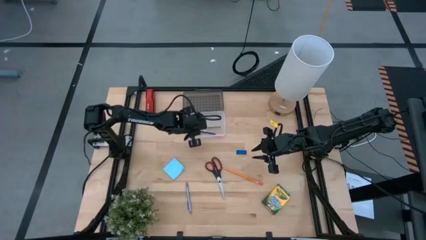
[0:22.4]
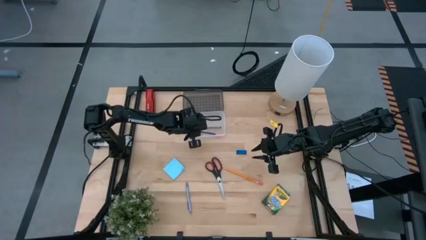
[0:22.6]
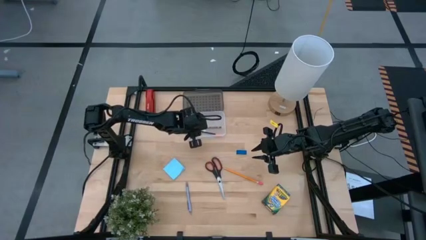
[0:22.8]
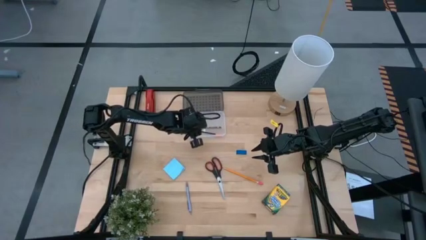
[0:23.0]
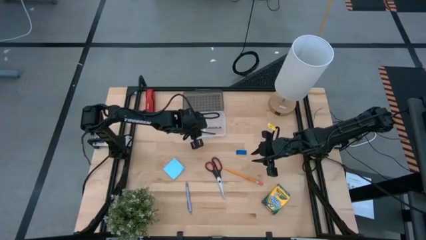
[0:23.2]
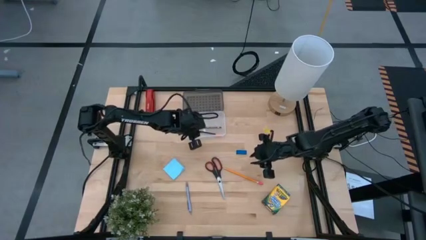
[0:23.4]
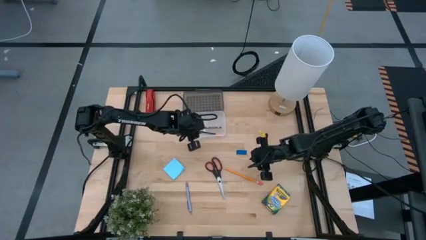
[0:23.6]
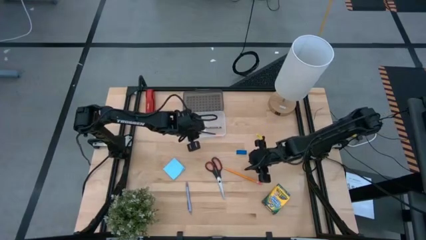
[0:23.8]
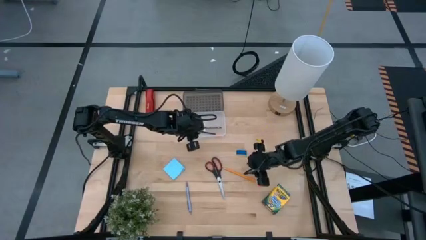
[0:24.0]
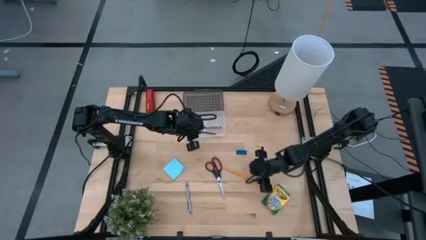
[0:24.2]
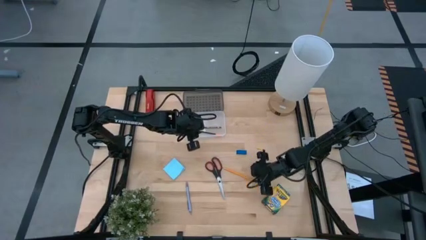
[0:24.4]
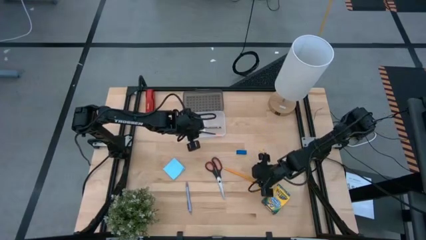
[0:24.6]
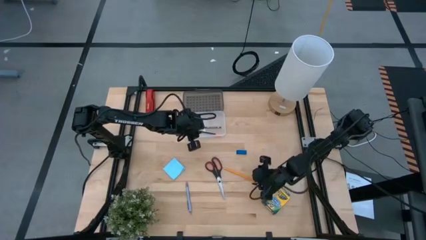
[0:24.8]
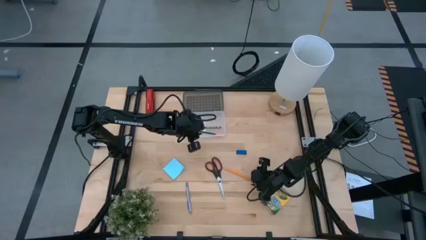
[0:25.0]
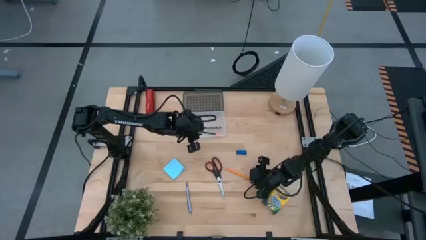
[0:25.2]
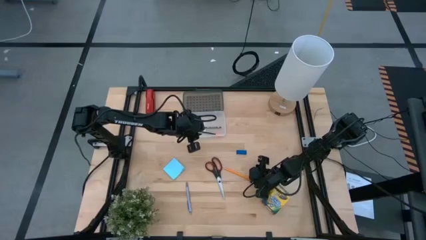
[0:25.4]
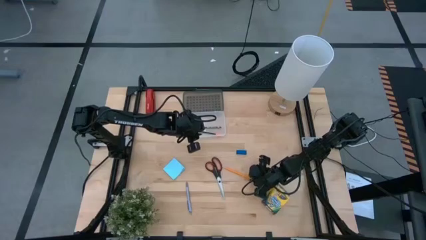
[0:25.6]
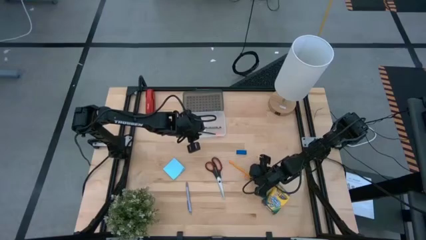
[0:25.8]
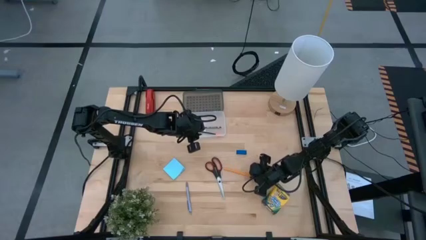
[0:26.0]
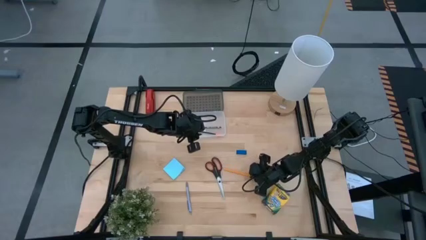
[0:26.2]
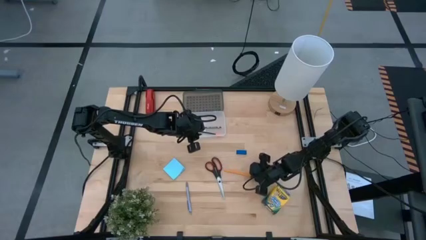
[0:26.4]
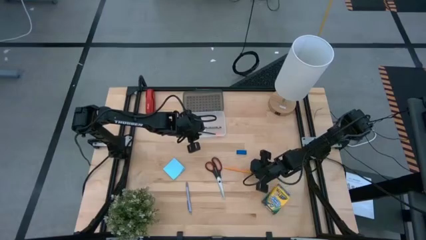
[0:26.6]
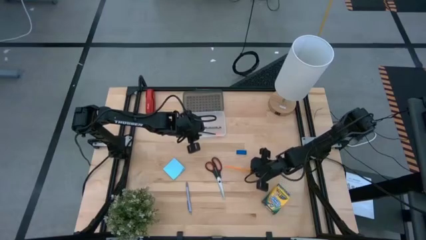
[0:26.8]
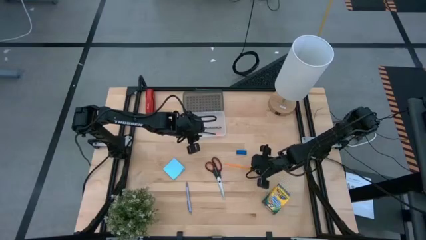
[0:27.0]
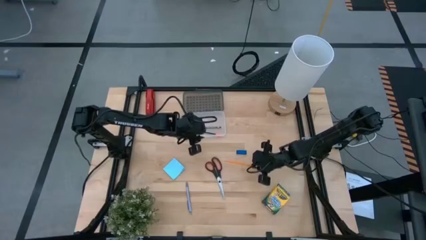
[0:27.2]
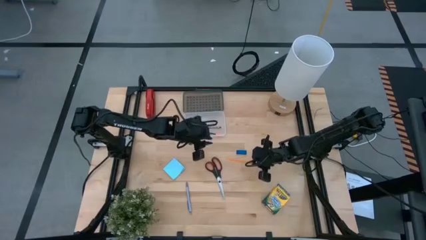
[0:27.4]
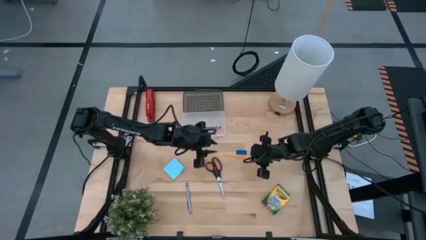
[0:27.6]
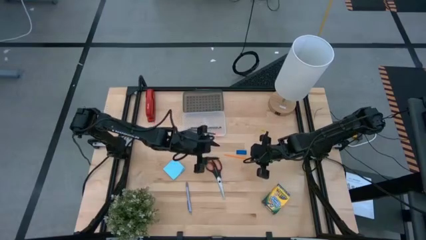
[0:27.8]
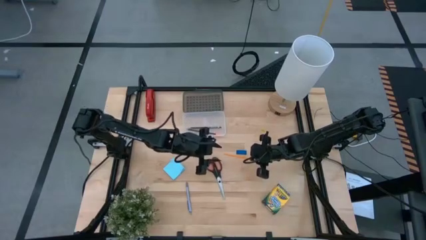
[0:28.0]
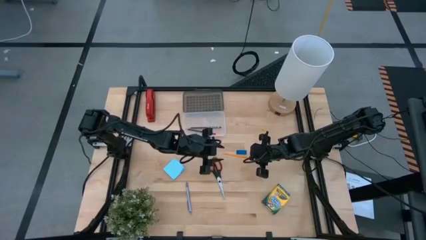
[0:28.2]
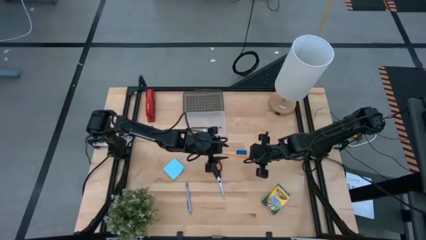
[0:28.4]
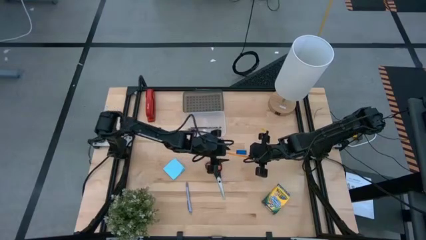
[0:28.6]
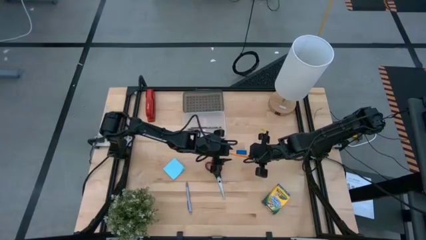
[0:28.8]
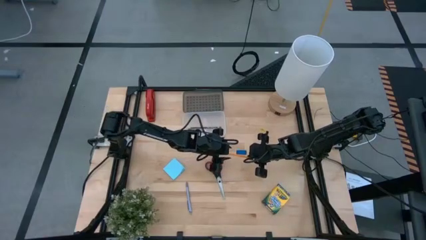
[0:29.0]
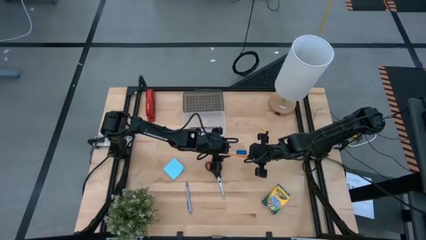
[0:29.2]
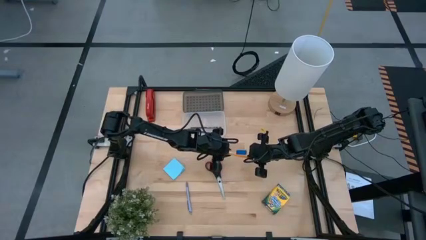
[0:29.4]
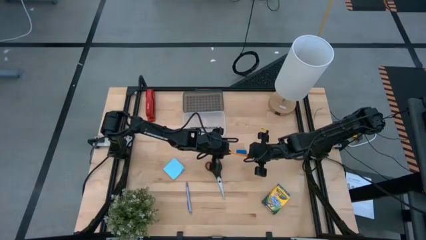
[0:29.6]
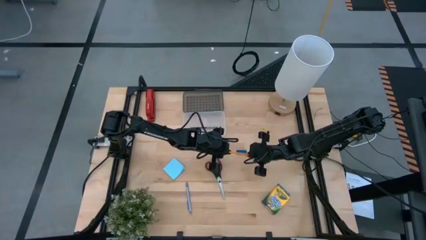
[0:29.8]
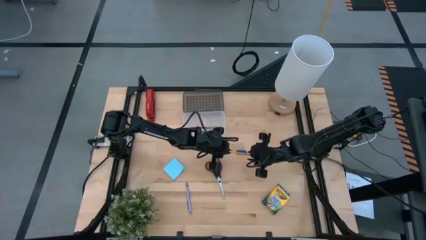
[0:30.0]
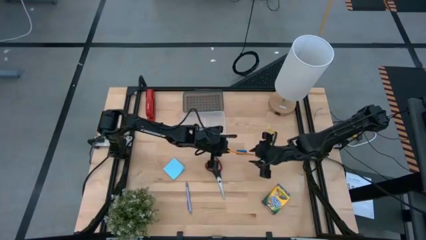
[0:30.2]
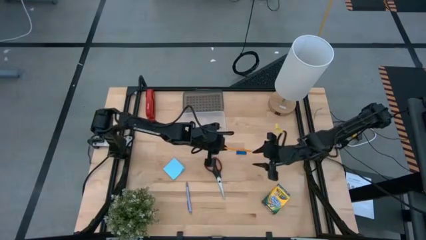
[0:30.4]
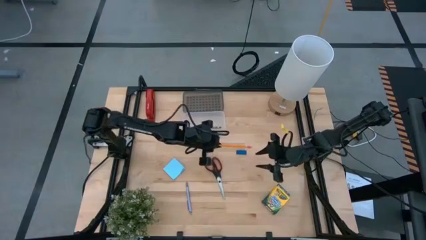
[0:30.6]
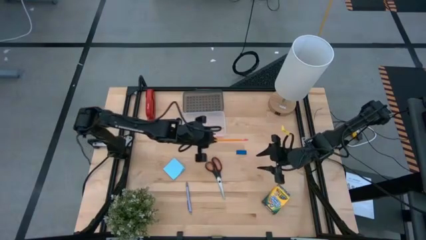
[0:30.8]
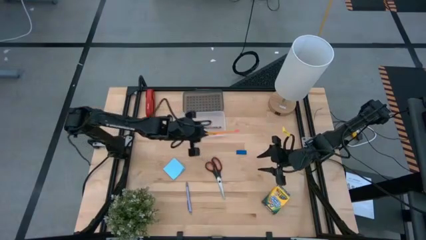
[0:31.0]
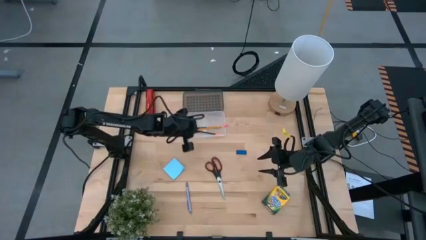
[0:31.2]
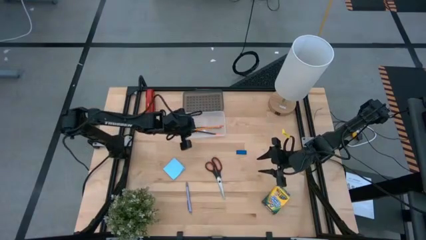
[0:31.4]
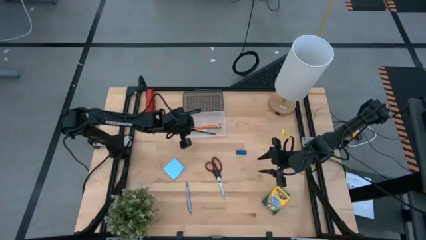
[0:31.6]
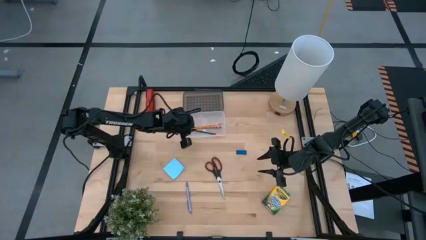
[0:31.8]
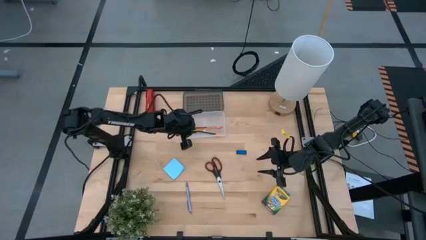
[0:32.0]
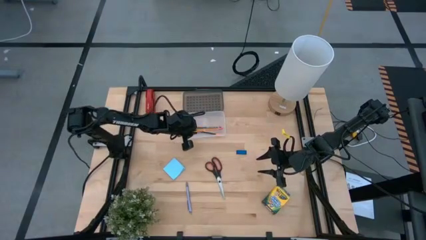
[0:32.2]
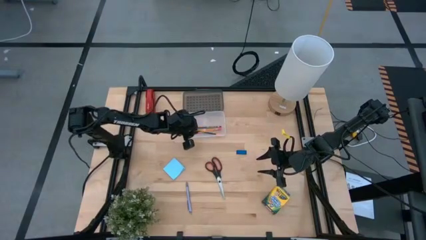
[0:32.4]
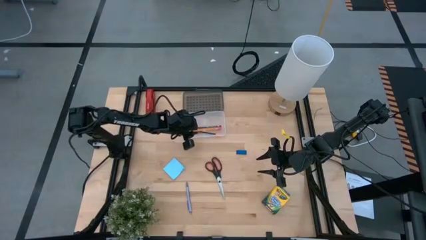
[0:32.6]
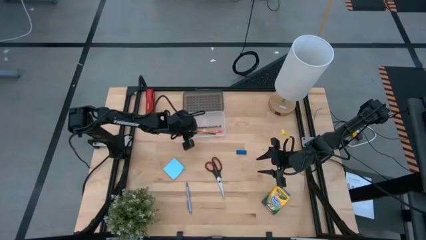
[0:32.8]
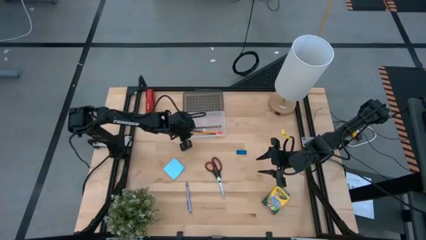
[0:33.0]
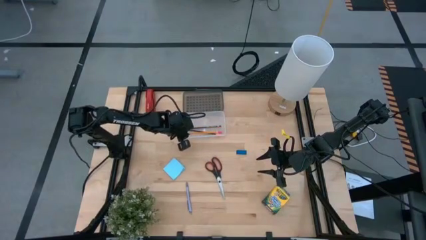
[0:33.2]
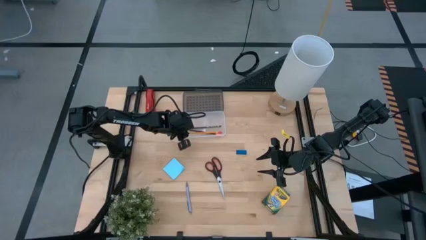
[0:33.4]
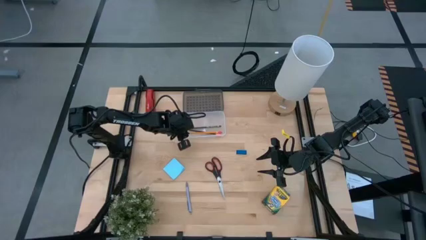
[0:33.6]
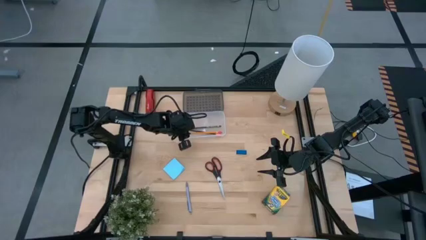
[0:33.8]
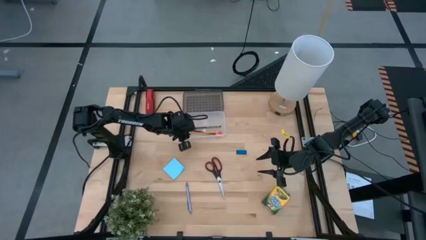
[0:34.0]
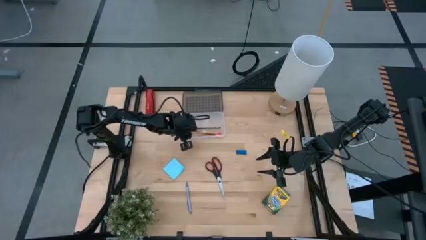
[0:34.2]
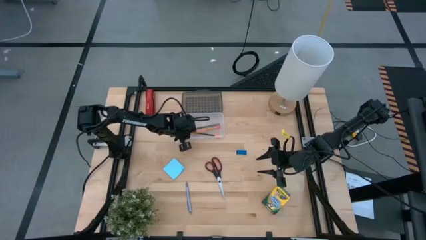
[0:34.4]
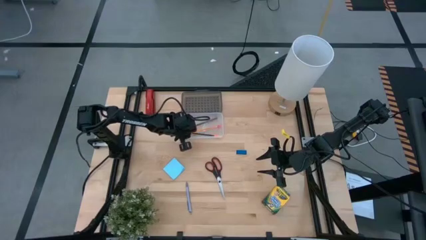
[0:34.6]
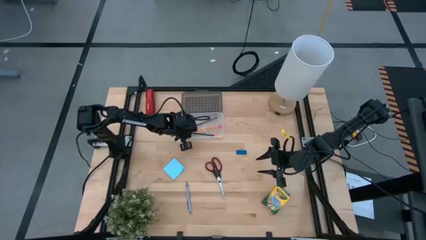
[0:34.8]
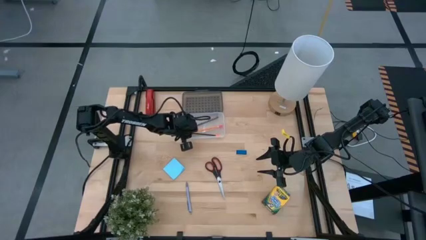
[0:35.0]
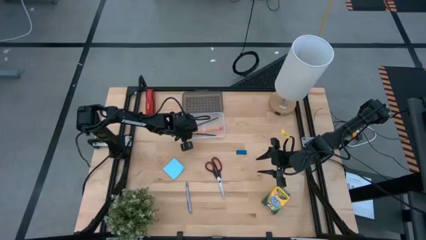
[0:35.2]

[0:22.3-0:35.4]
Task: Pack school essentials
Put the orange pencil into the black supply box

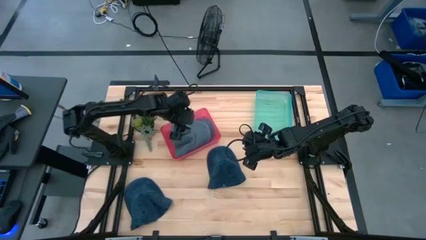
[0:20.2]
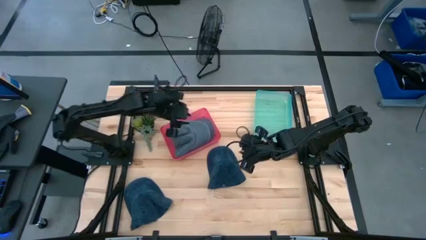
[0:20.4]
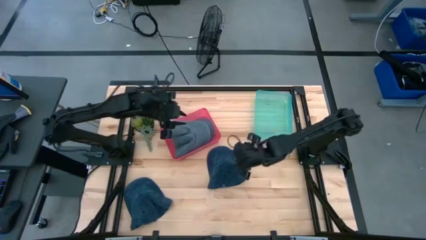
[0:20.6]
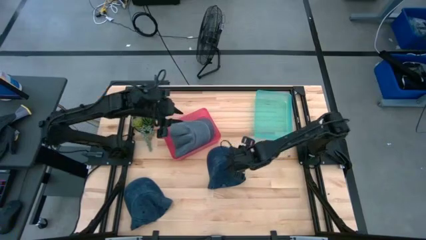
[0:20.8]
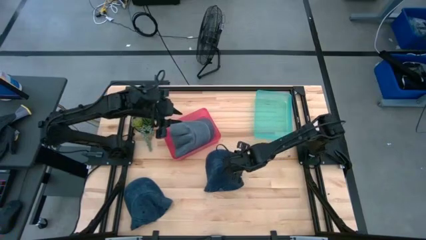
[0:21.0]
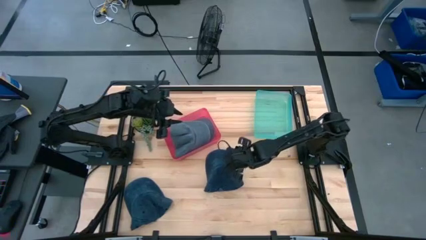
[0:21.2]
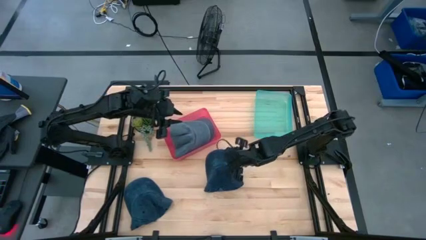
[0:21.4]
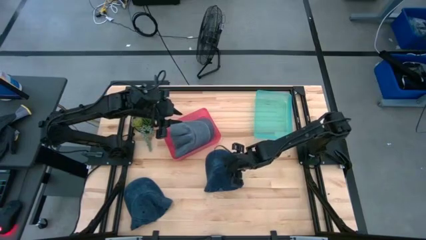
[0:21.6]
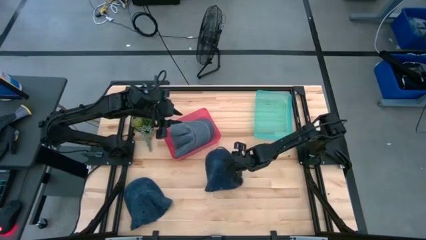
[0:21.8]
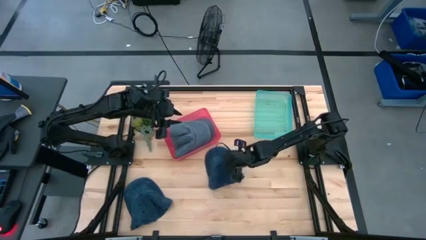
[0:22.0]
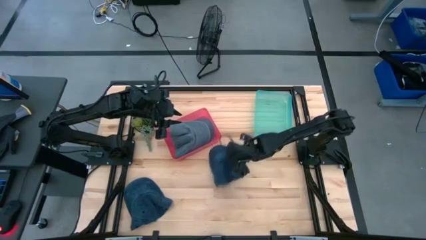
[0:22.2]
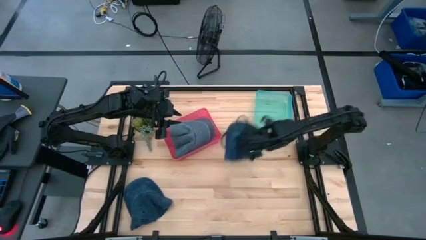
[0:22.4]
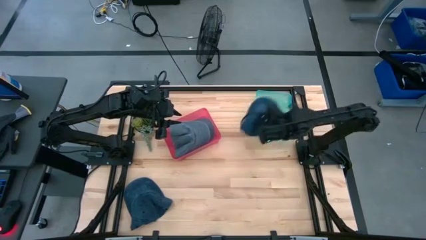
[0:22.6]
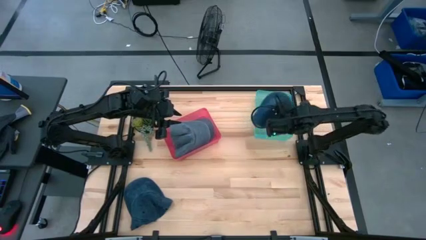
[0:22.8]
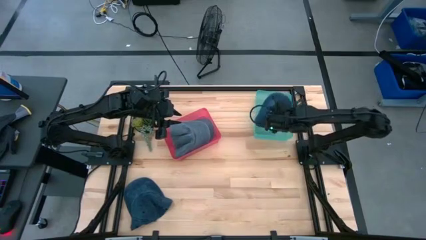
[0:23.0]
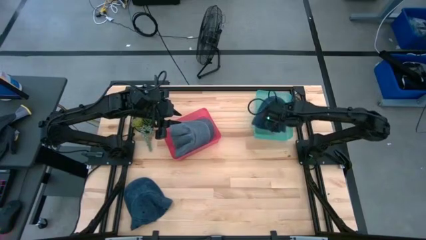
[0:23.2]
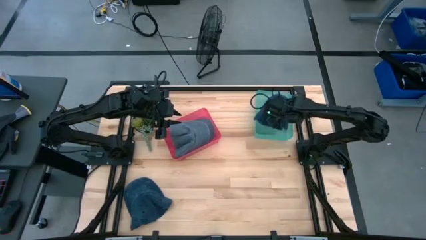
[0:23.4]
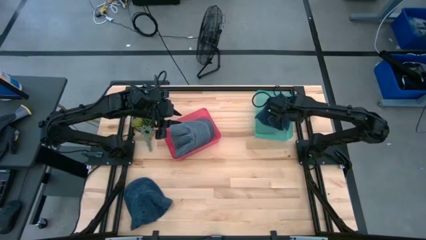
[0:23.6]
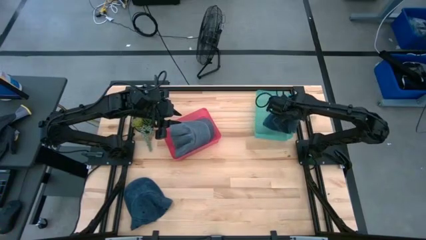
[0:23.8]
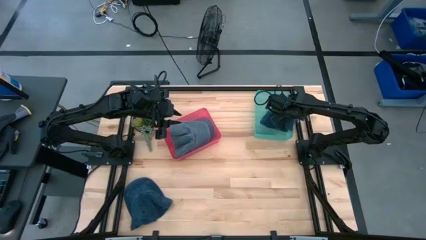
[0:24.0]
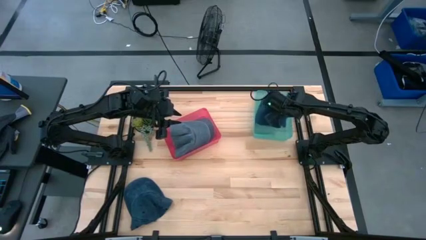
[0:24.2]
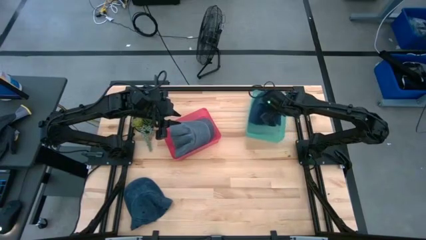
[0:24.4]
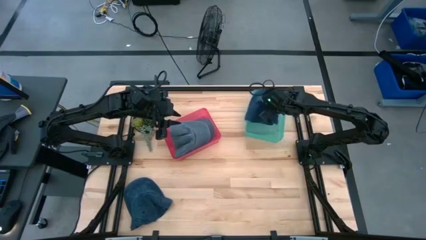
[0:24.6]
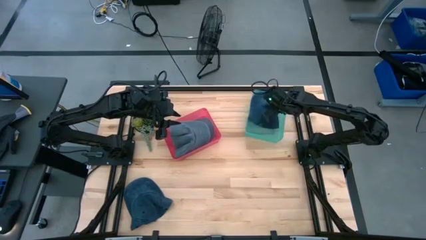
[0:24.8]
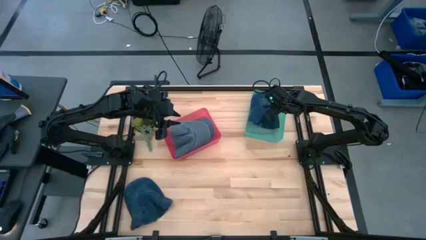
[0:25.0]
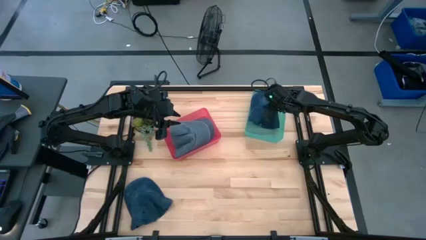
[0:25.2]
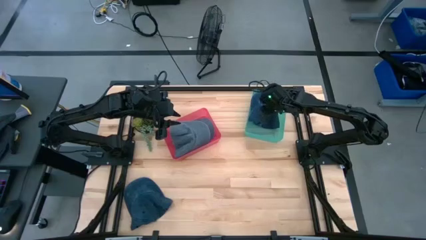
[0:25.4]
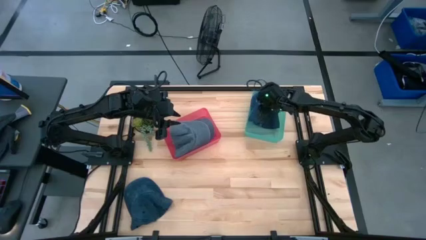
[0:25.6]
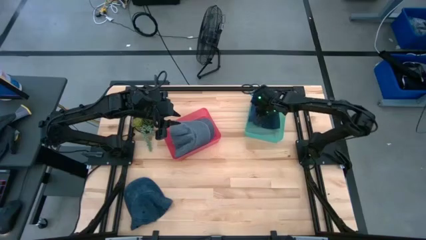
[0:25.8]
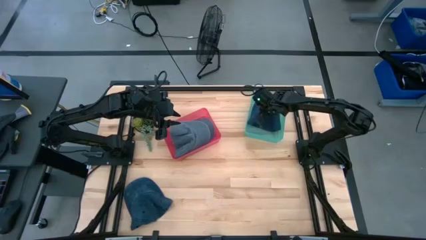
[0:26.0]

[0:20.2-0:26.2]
Task: Pick & Place hat
Put the top blue cap into the green bin
